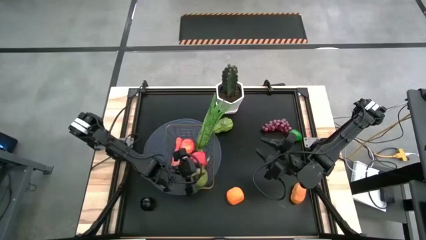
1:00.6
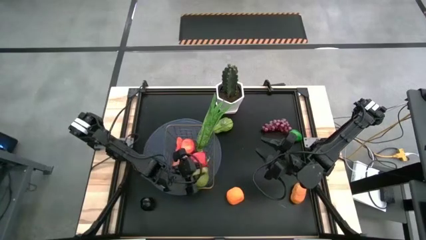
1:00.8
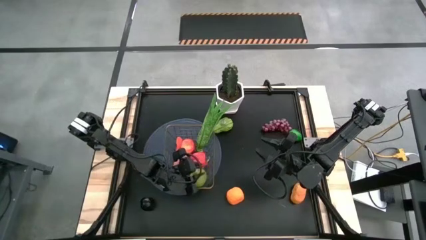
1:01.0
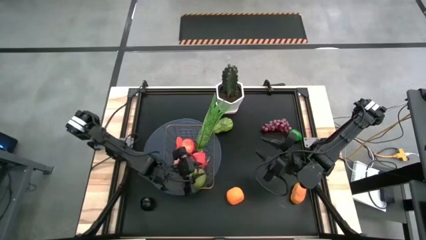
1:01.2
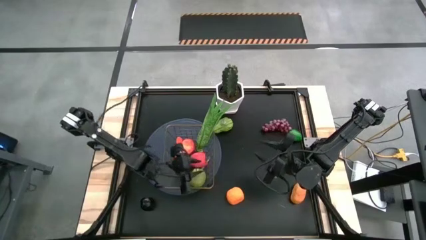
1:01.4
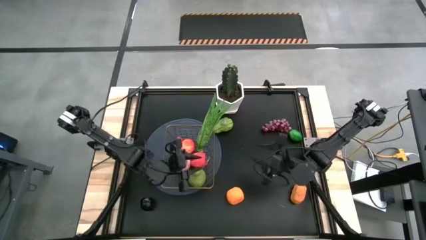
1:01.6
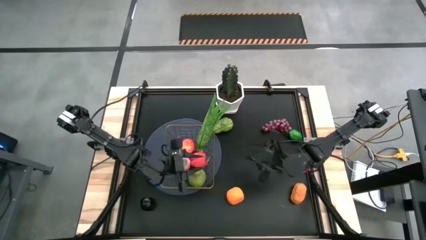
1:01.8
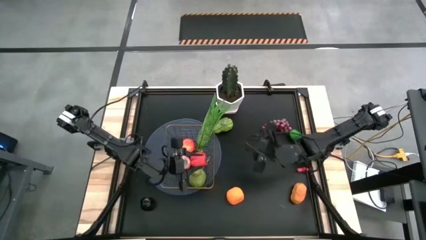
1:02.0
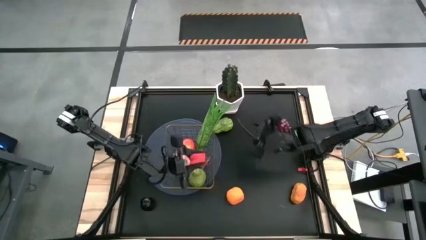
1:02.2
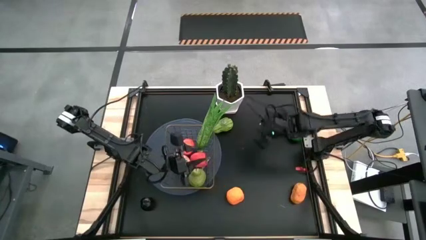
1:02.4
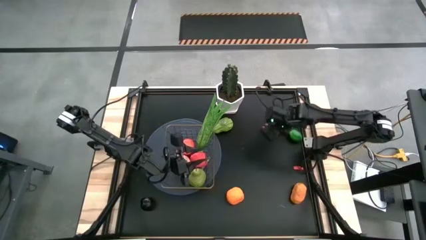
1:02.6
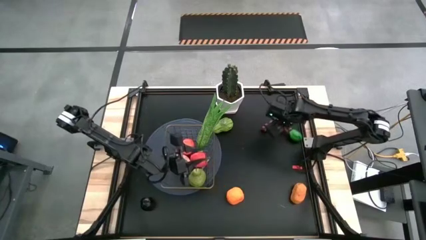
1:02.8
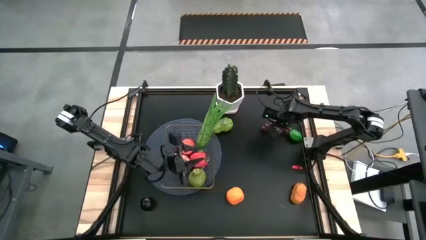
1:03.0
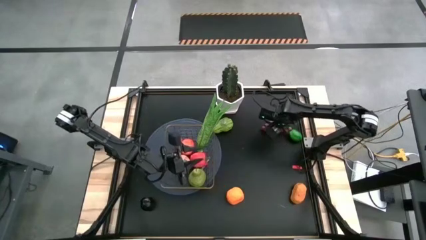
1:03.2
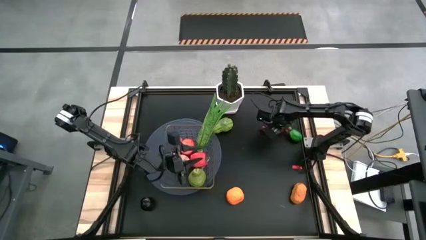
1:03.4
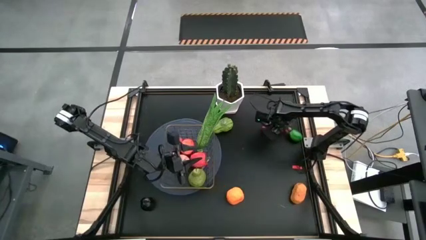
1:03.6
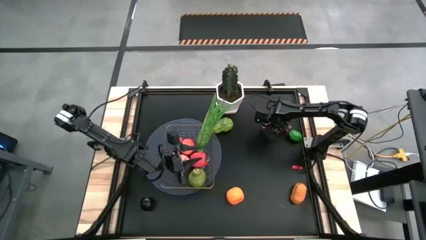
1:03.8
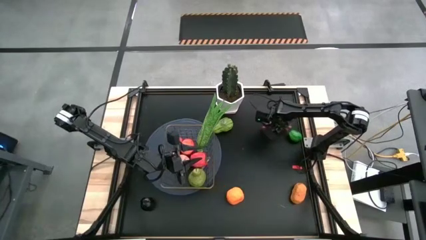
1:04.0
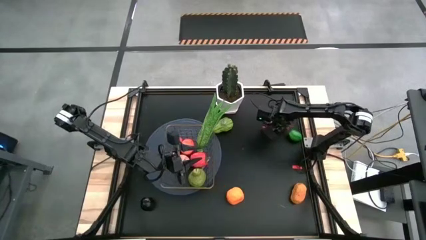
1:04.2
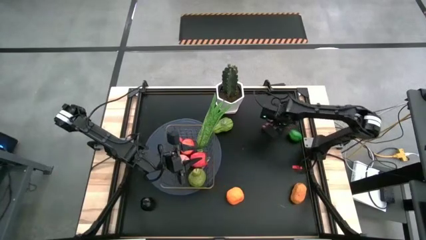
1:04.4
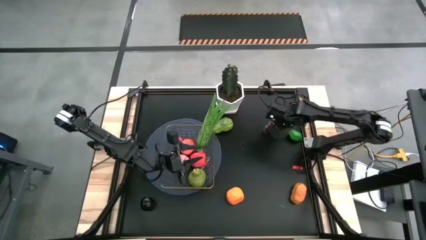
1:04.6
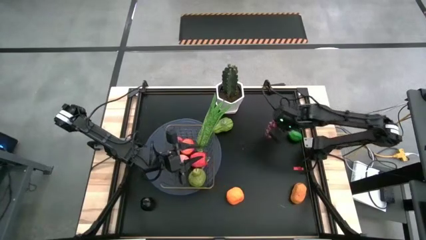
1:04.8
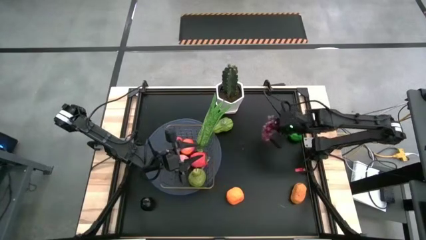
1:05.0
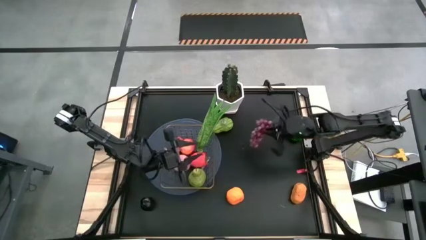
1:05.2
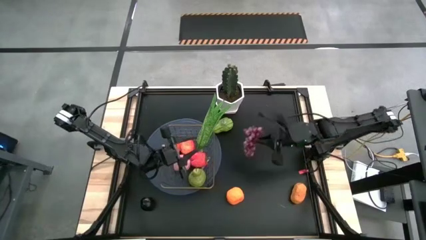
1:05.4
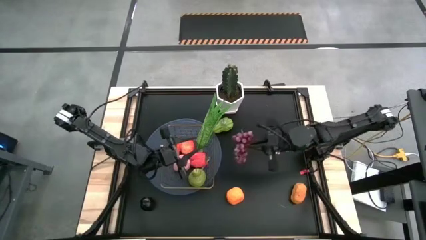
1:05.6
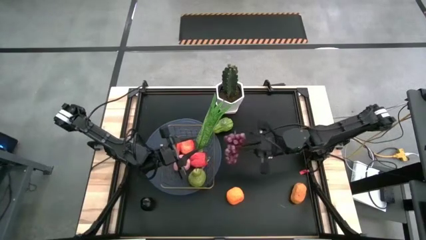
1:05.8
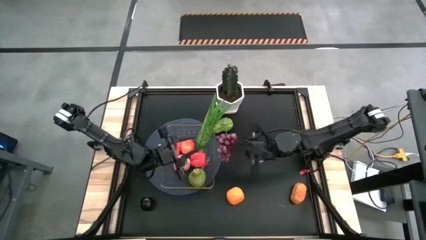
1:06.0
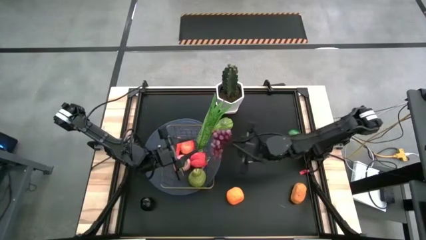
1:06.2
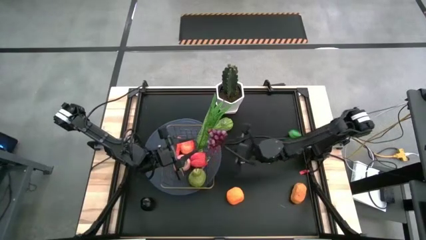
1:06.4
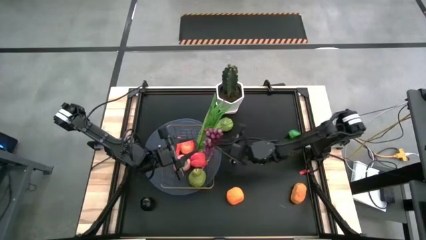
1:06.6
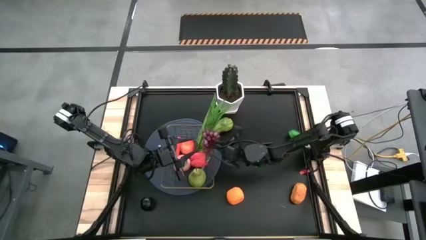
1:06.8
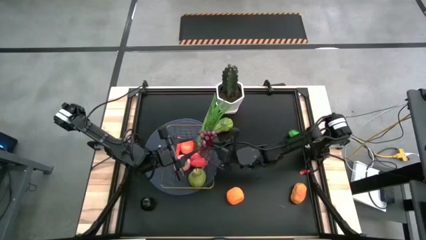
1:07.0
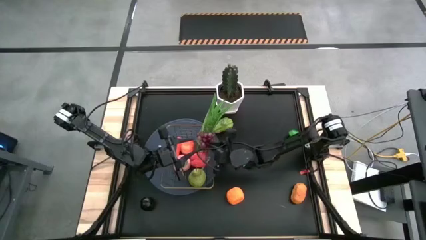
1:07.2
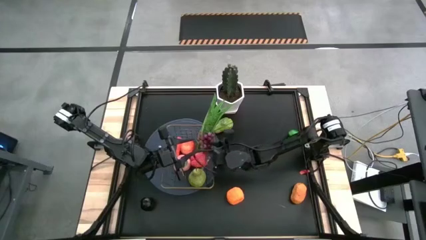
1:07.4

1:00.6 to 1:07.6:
Task: Build produce basket
Put the red grapes into the wire basket

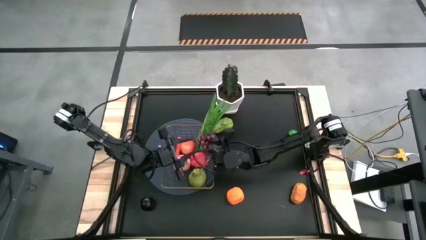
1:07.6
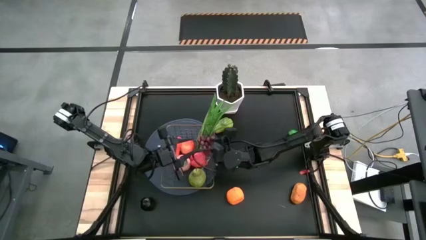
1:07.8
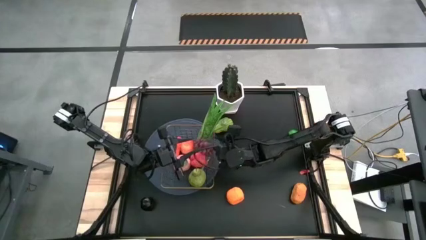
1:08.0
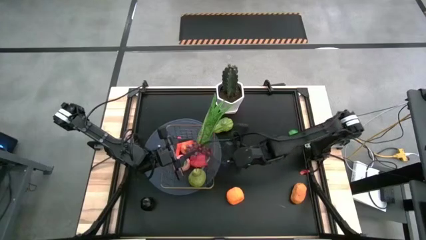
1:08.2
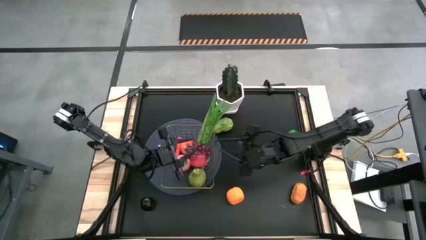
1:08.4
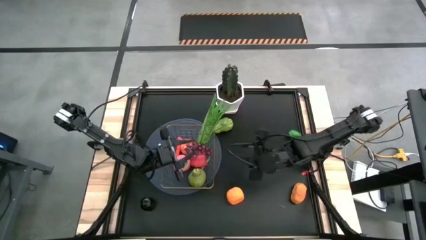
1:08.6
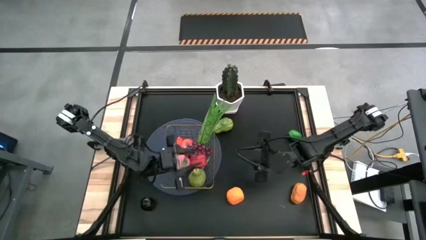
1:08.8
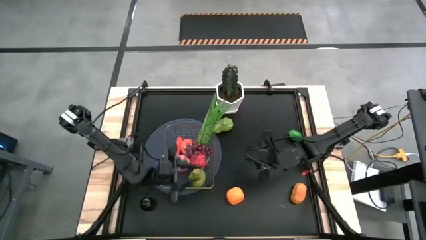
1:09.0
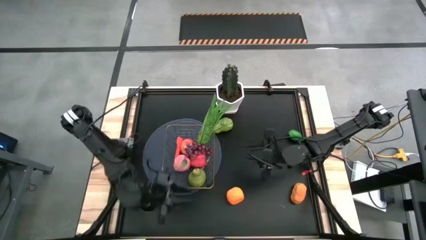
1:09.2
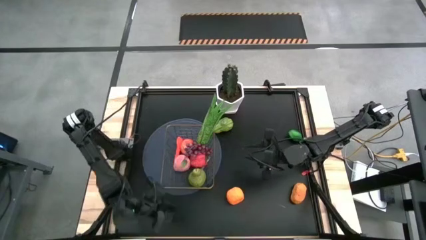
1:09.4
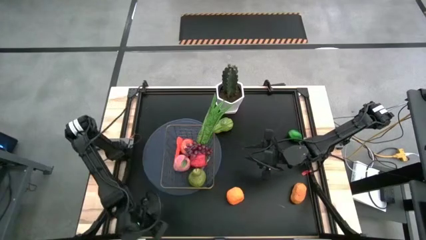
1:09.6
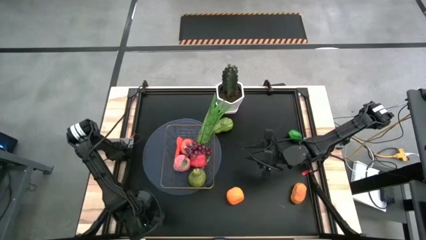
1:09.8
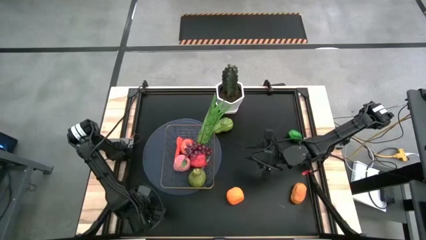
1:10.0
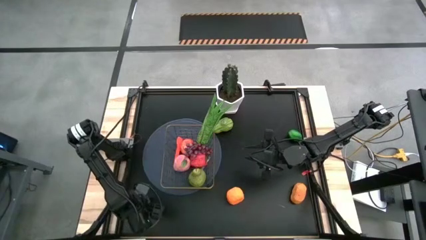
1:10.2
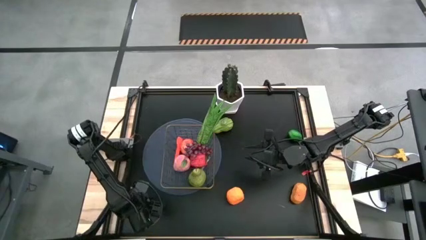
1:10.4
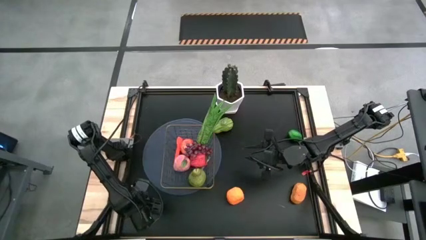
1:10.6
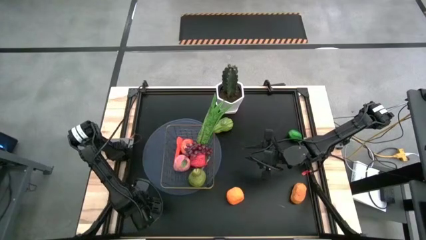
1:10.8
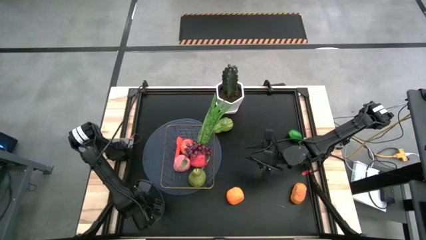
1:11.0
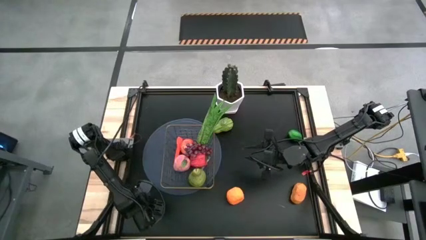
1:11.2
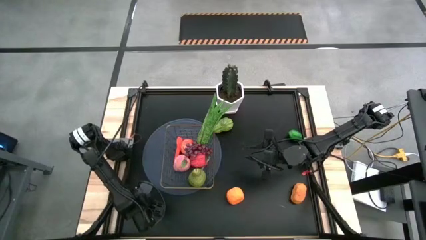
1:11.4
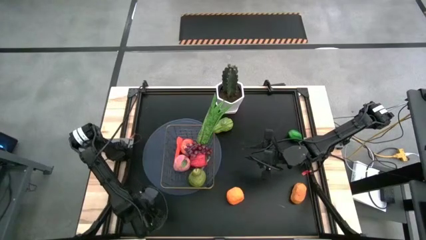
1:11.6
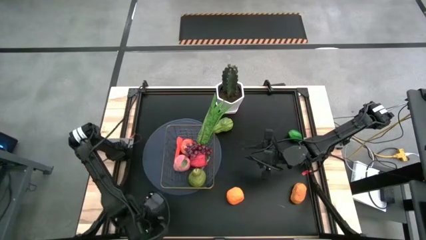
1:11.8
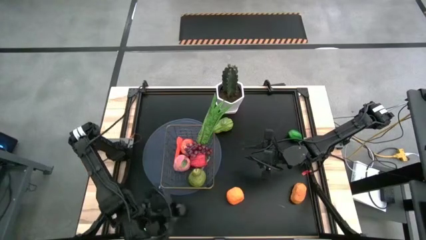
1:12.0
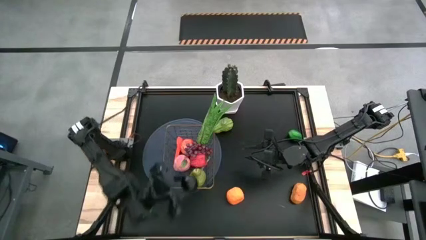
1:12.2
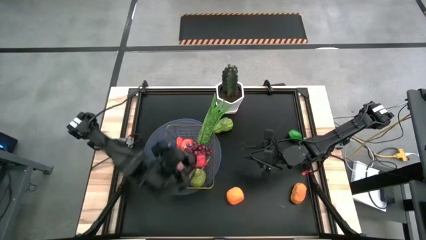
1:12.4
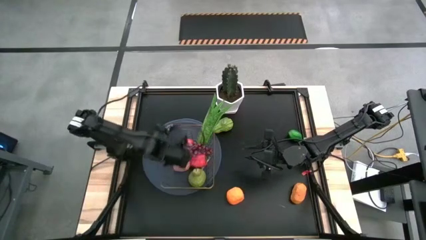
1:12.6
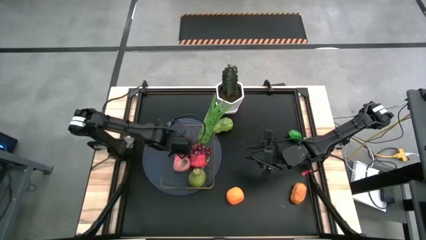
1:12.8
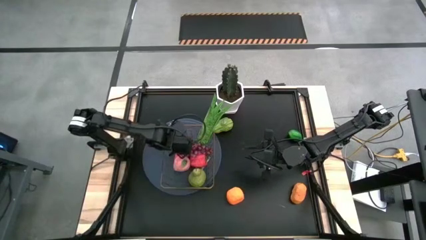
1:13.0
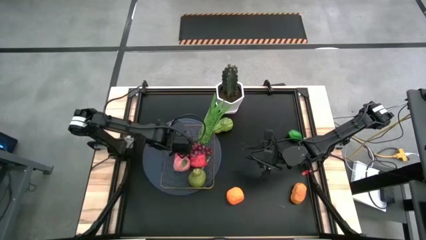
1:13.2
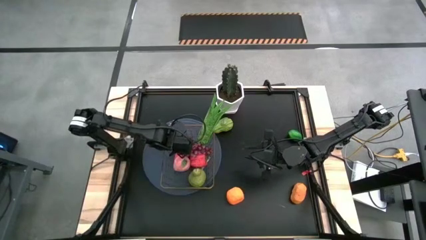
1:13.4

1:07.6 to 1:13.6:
Put the black plum into the wire basket

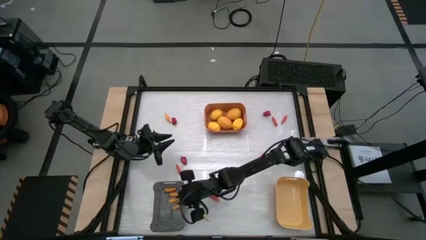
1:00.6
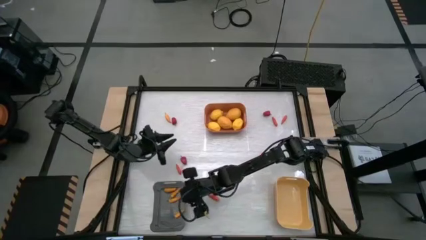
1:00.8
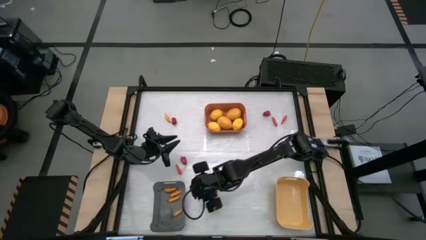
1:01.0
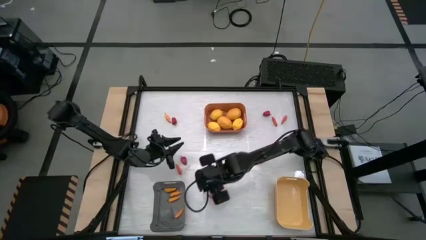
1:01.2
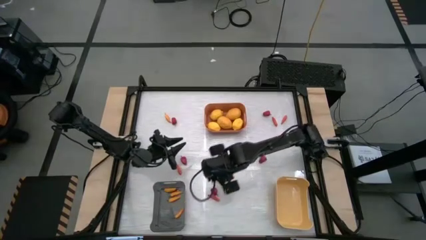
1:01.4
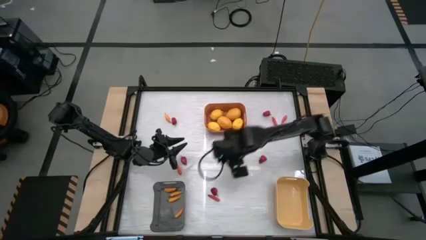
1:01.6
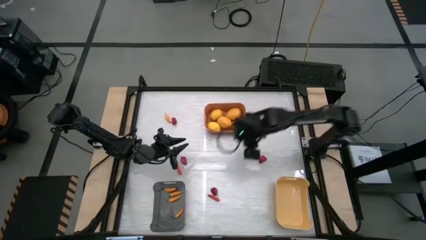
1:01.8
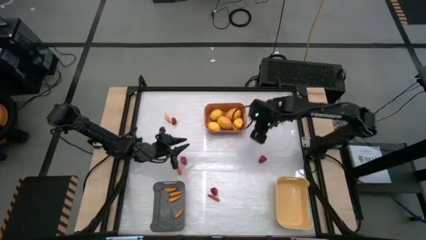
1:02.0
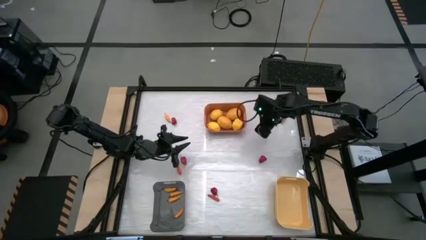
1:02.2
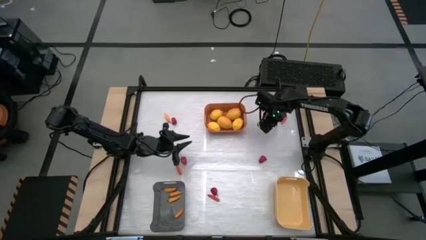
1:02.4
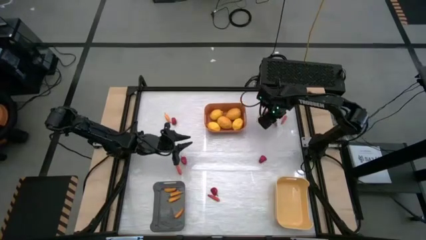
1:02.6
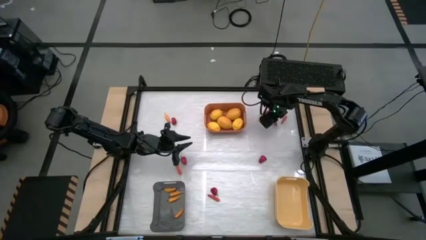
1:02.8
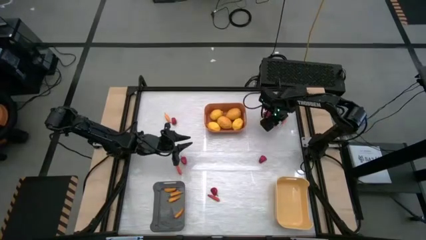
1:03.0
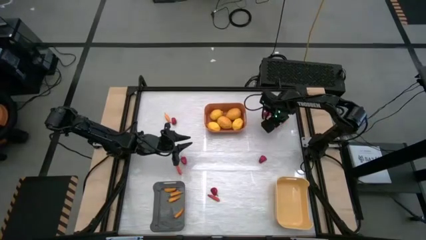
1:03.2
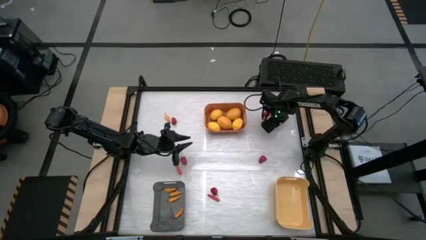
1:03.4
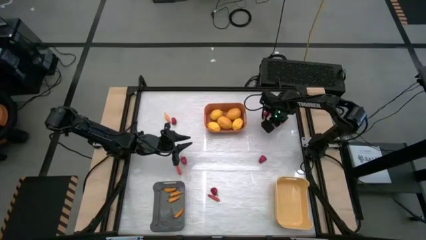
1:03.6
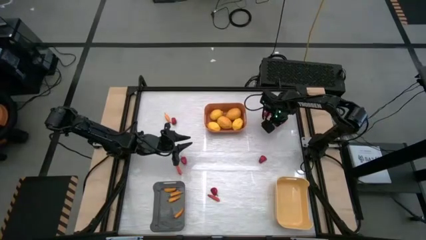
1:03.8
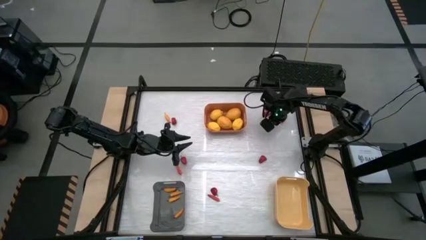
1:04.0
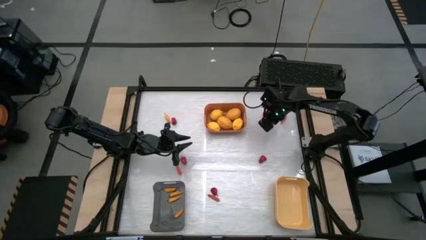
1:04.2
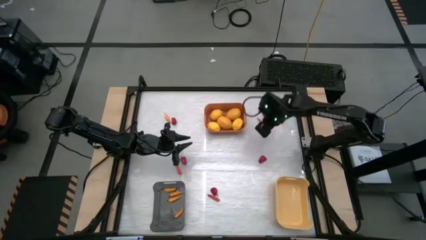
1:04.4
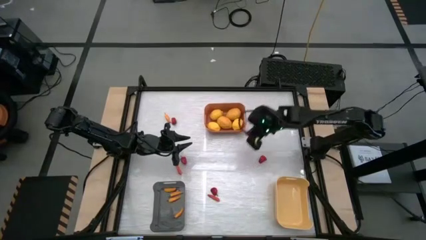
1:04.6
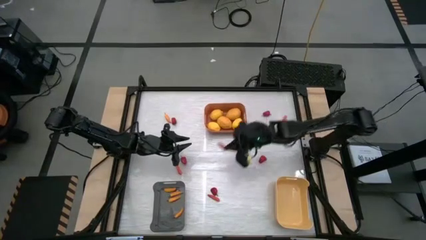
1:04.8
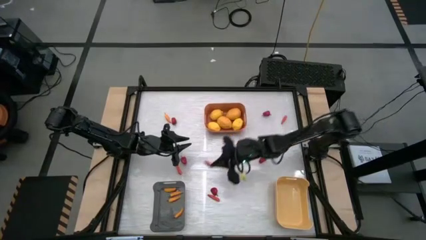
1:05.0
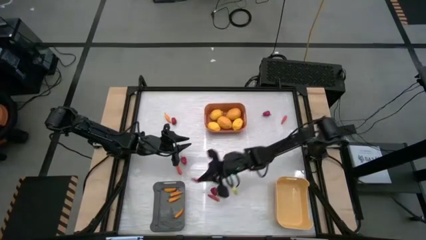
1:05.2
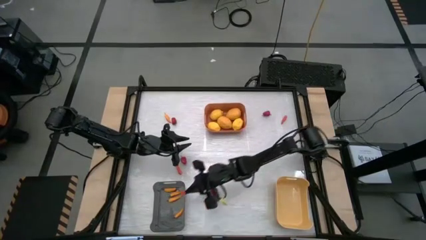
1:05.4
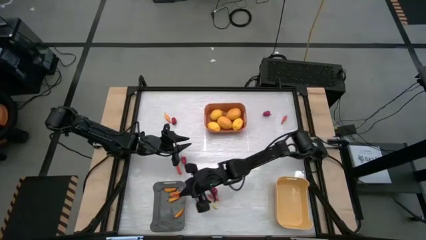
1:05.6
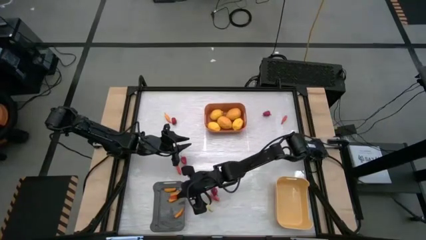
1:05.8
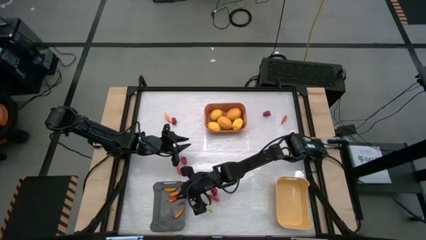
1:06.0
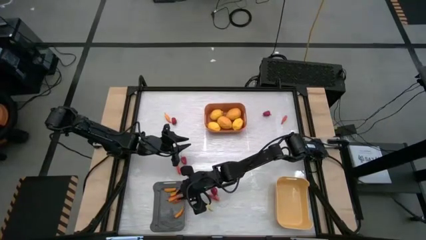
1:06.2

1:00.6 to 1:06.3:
Task: Sort produce into baskets
Put the orange chili pepper into the black bin
